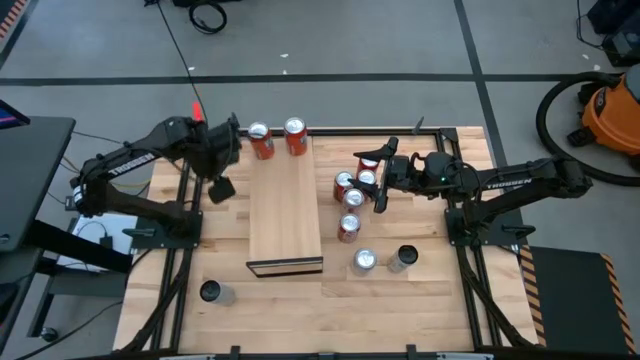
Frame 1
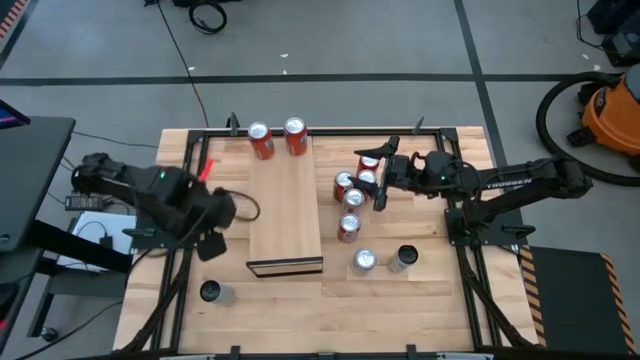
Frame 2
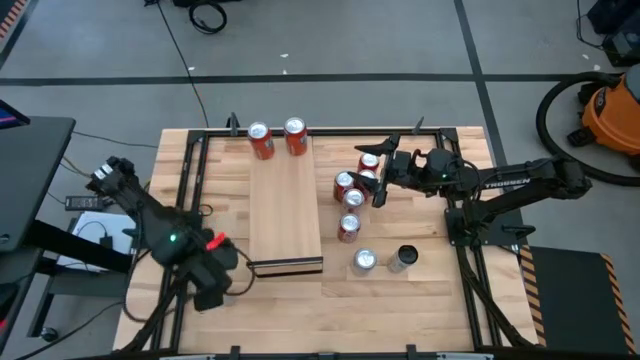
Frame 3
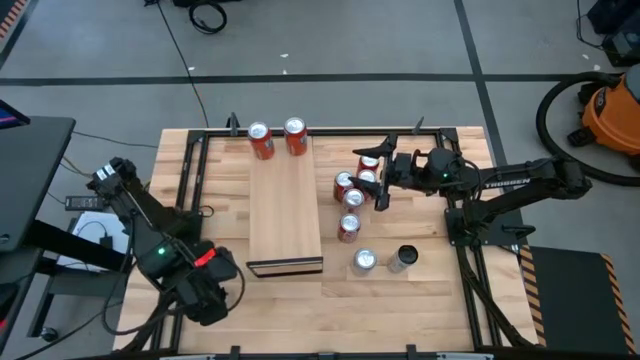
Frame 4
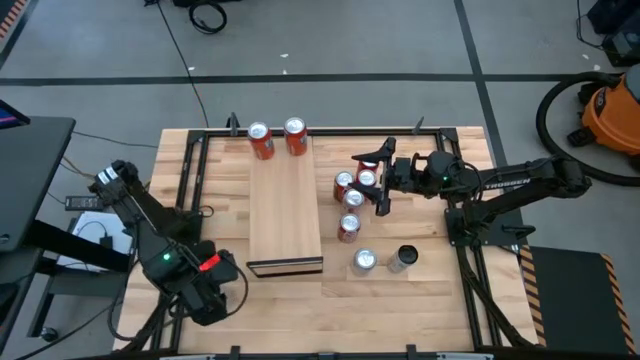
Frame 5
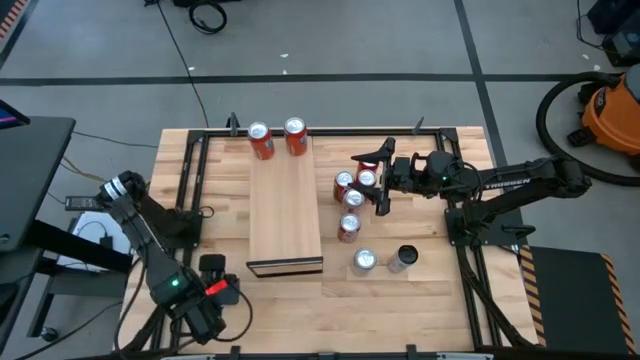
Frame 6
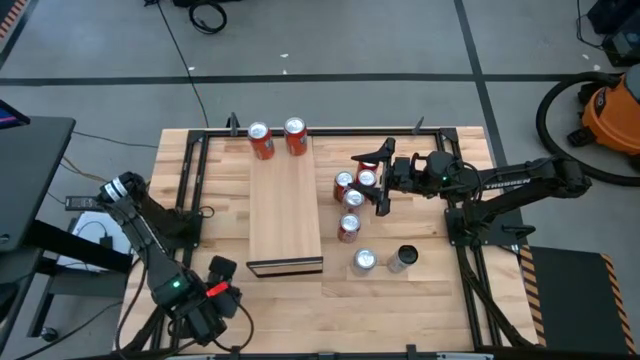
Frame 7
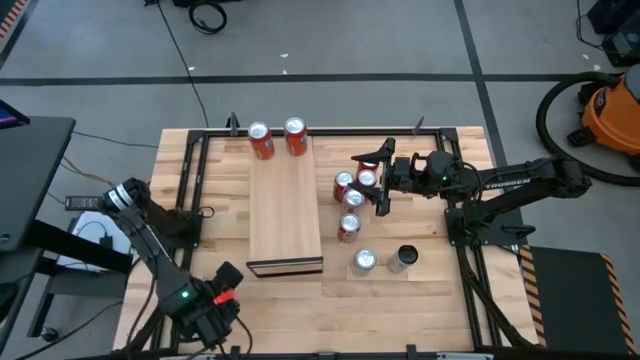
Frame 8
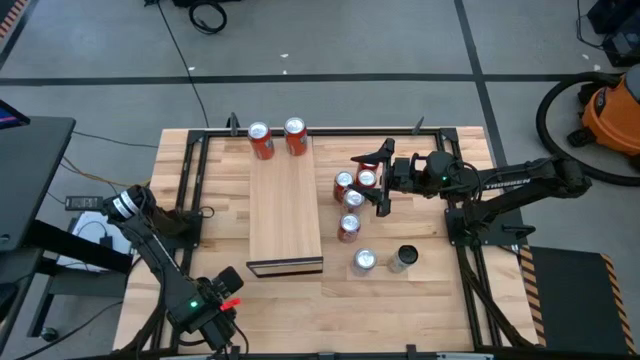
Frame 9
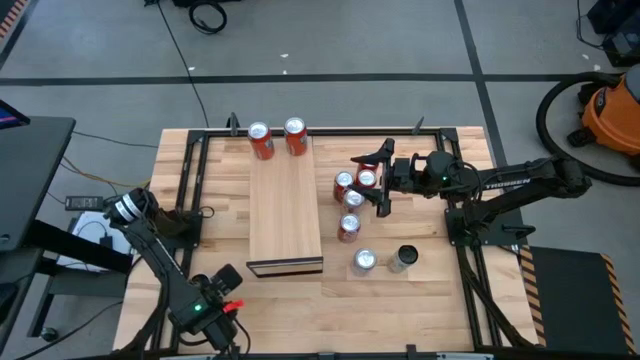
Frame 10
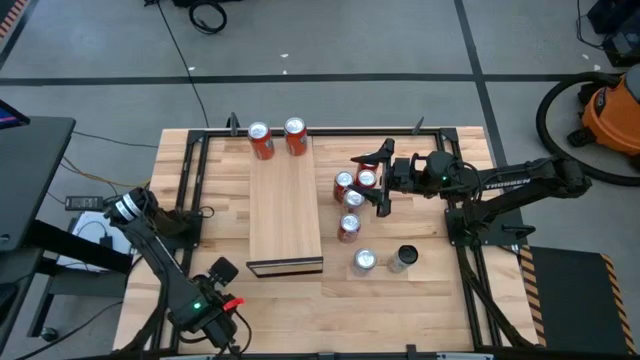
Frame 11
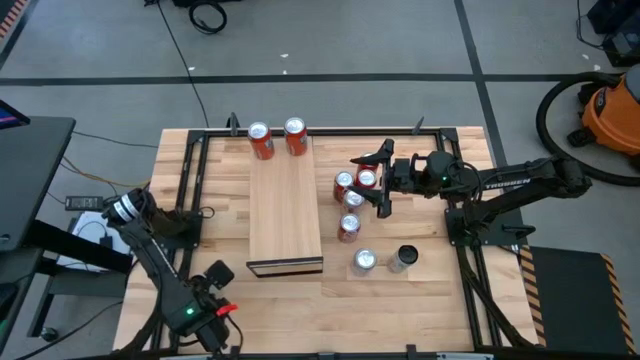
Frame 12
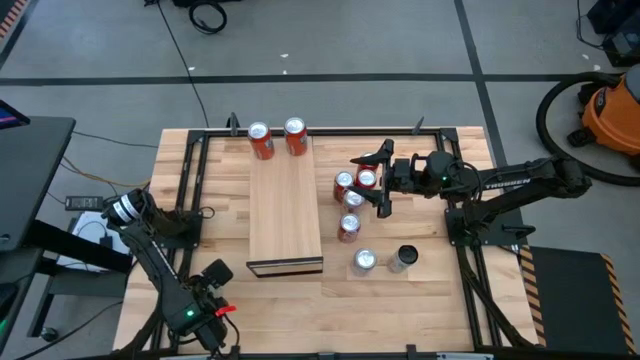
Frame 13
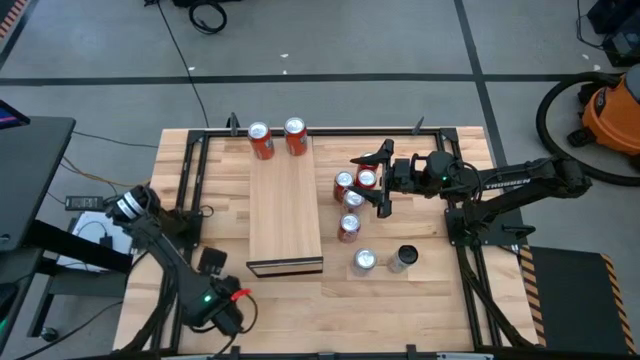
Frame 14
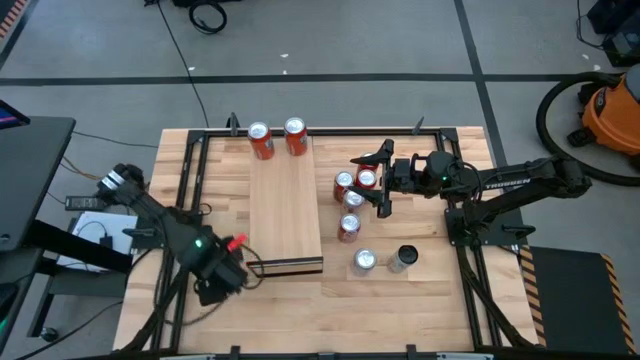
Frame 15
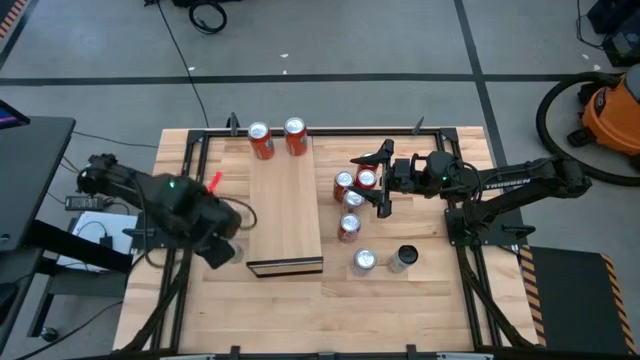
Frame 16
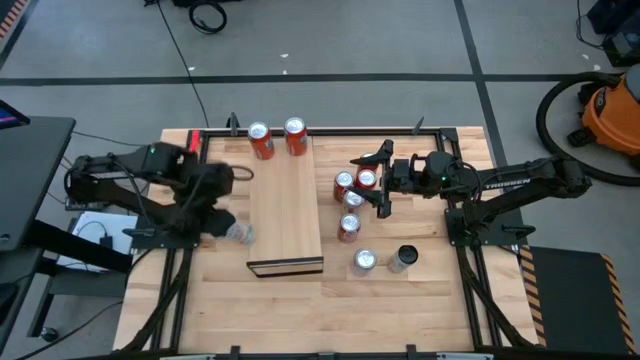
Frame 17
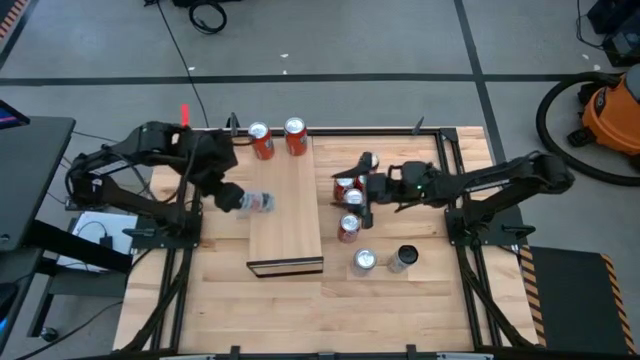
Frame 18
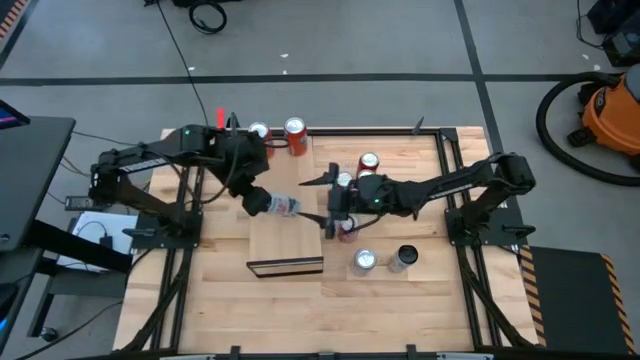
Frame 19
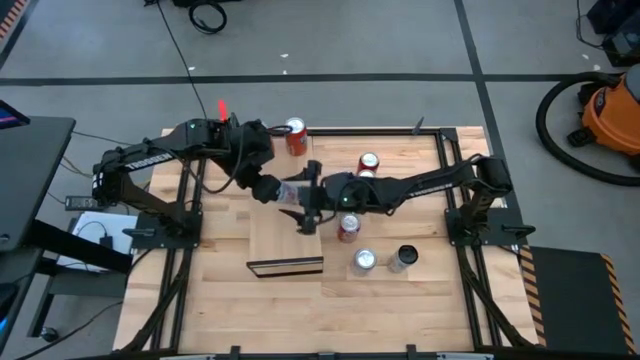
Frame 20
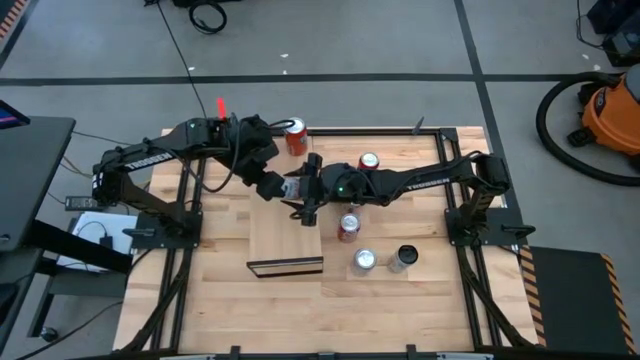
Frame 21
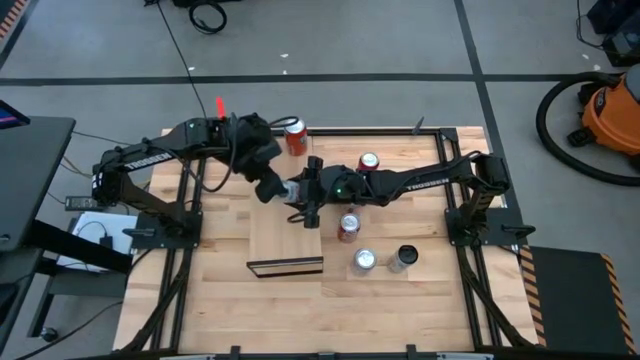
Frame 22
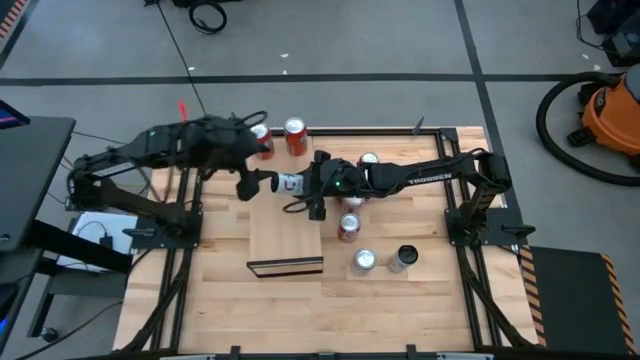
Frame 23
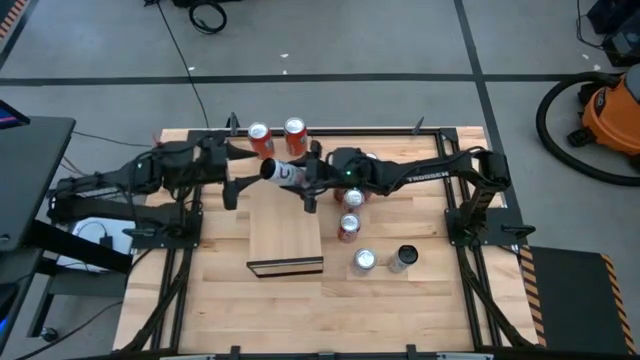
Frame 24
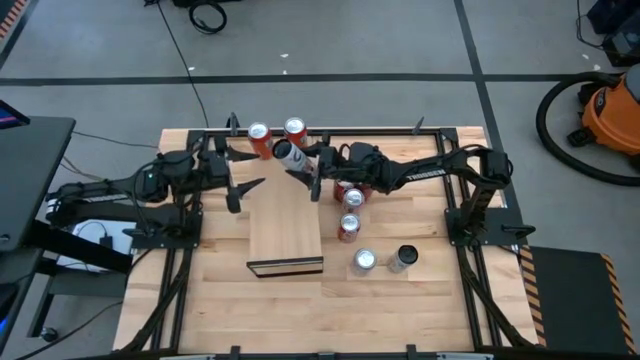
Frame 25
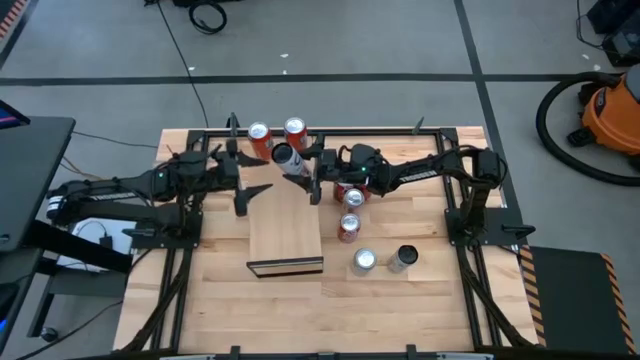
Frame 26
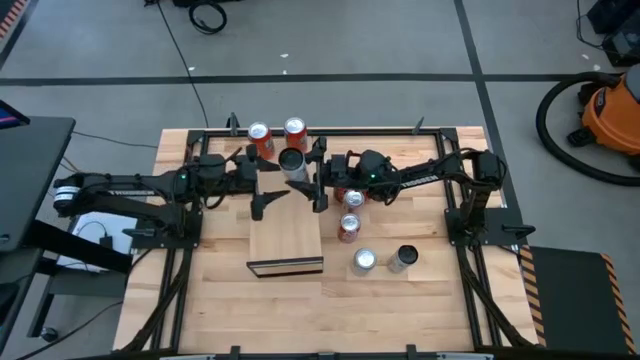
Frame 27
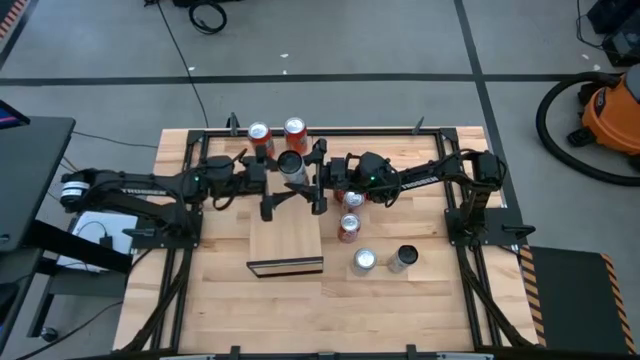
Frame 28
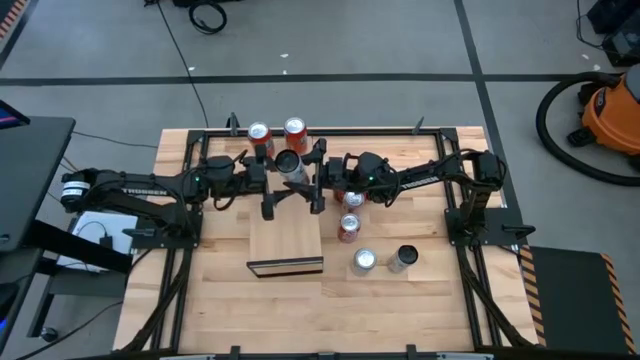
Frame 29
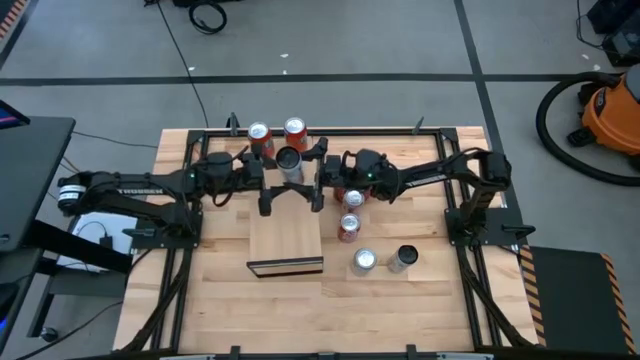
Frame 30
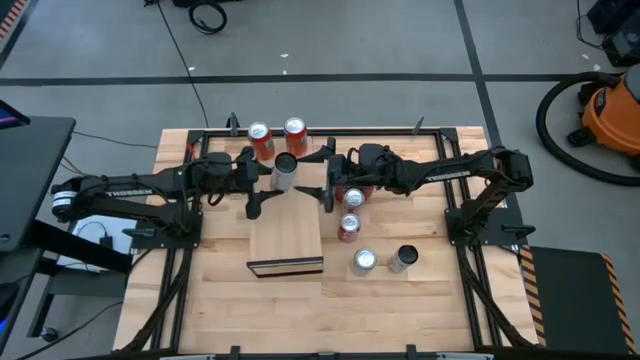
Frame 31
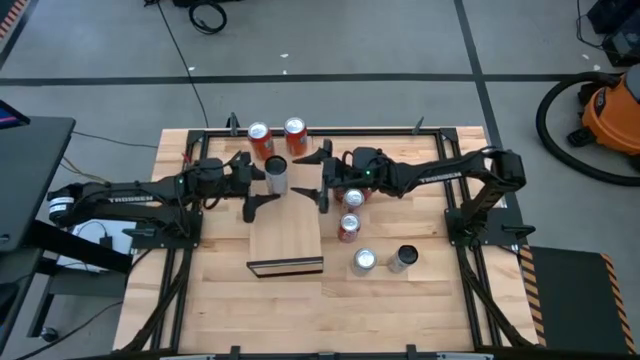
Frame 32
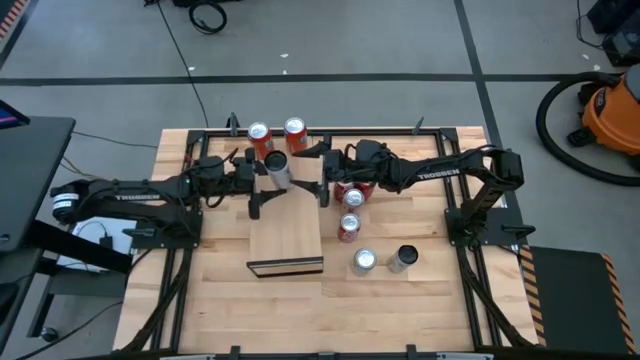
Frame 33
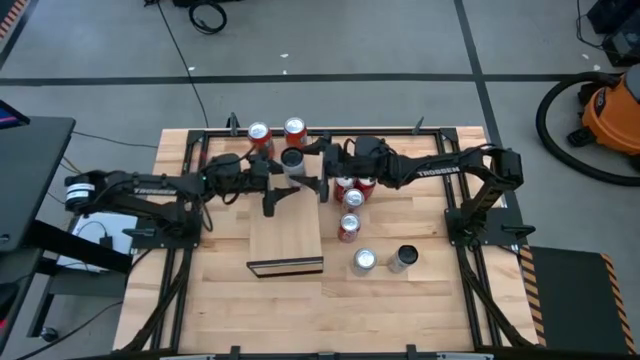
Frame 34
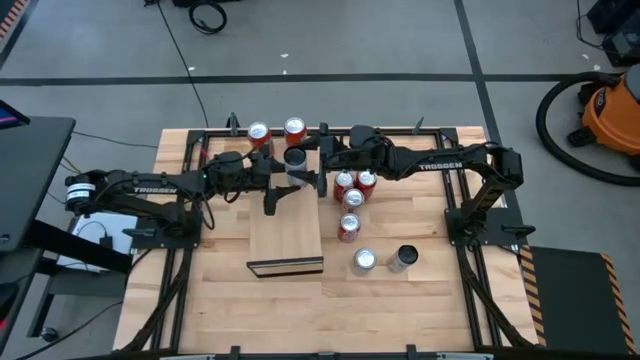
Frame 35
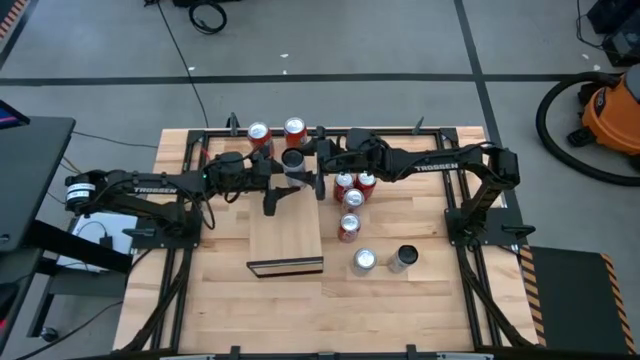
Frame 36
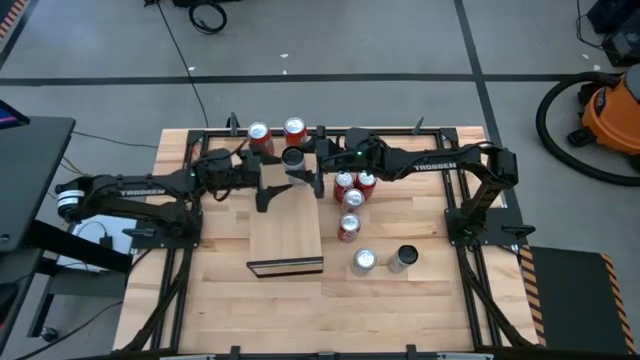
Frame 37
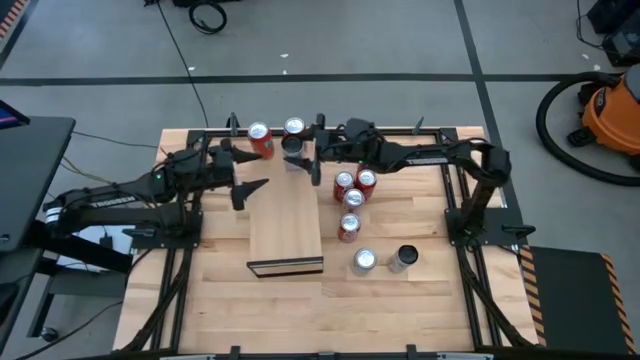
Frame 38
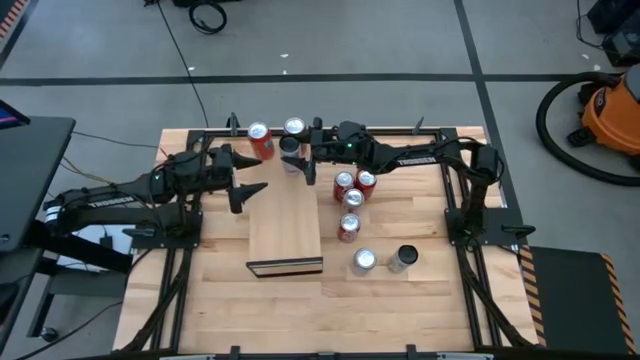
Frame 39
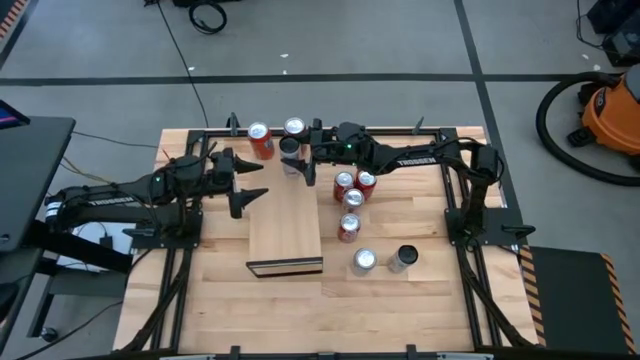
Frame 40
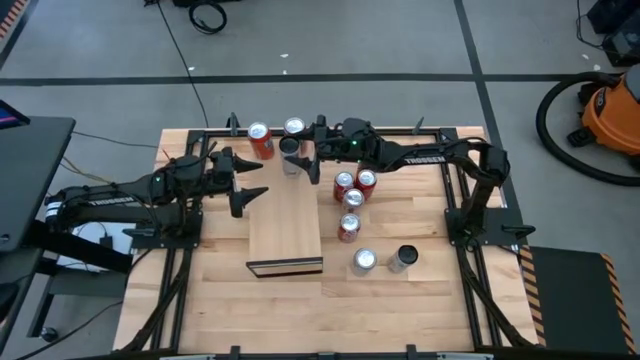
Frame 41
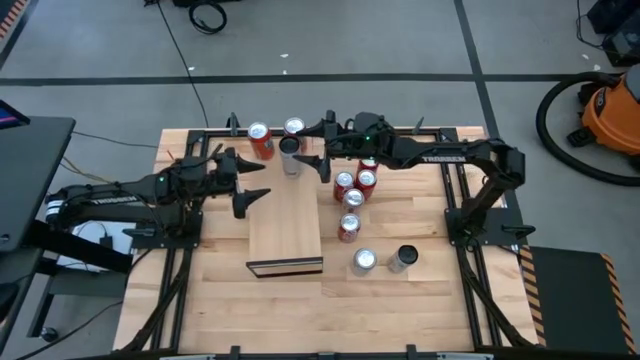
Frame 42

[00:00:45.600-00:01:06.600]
Task: Place canned beverage on shelf
Put the bottom white-pink soda can on the shelf
